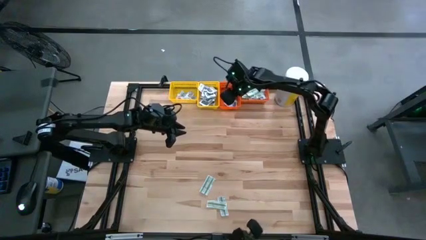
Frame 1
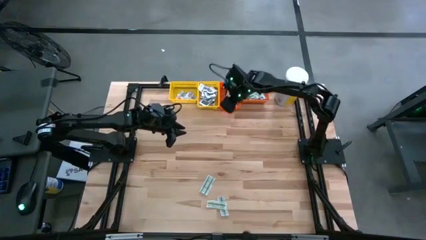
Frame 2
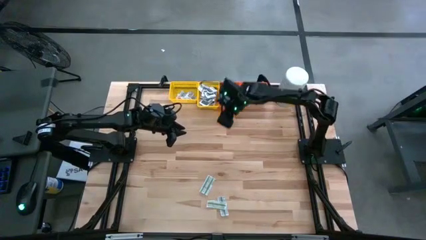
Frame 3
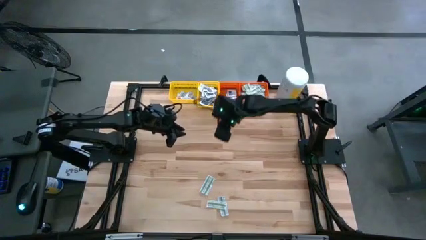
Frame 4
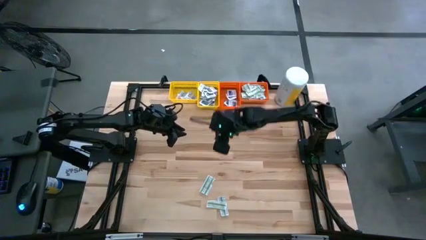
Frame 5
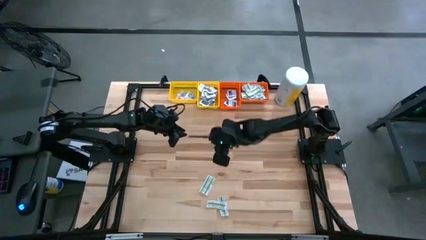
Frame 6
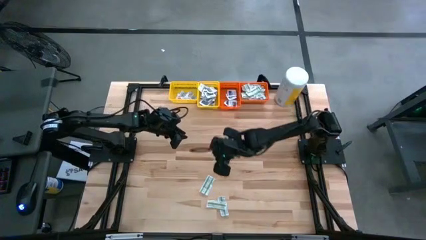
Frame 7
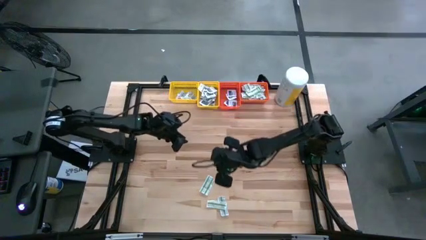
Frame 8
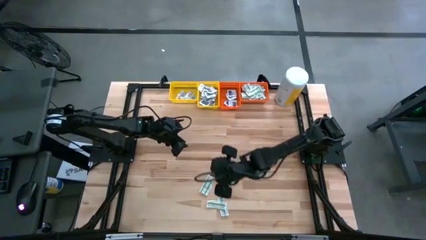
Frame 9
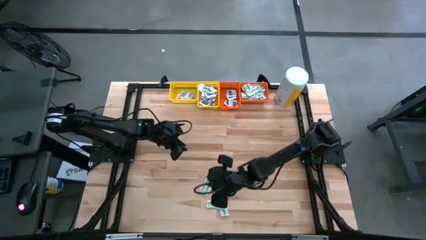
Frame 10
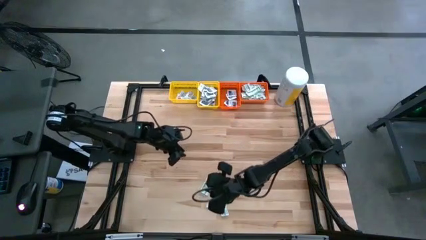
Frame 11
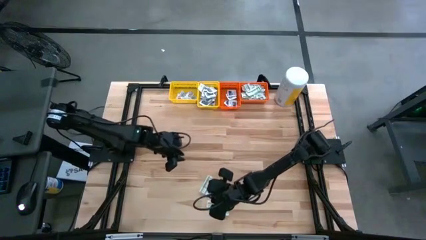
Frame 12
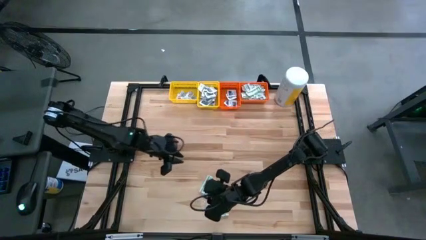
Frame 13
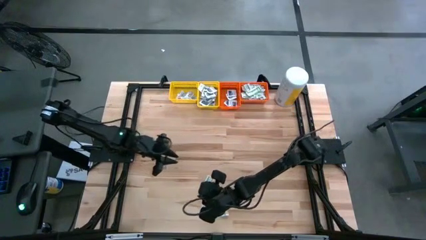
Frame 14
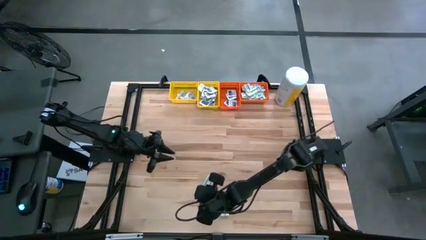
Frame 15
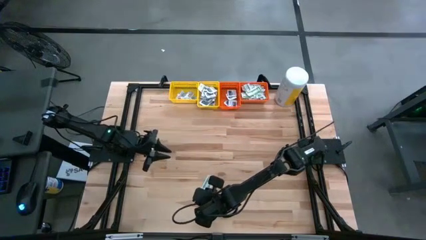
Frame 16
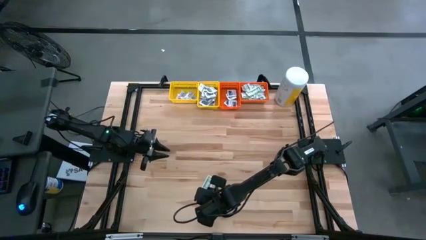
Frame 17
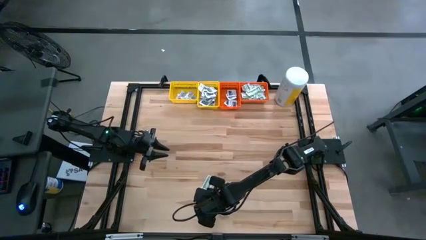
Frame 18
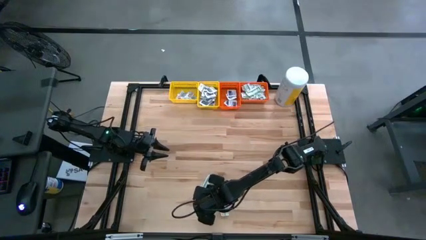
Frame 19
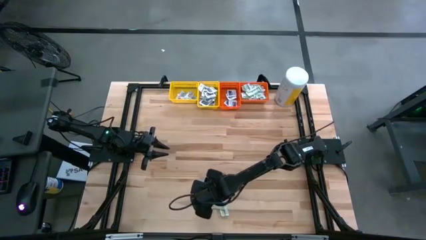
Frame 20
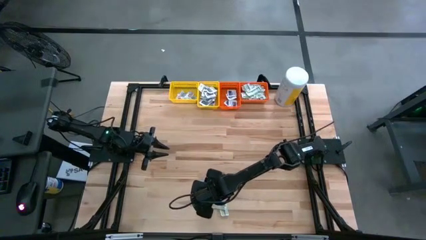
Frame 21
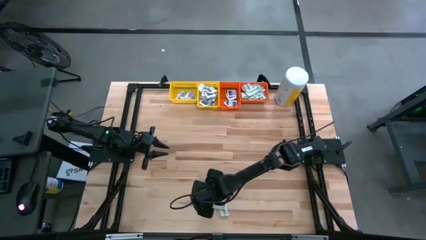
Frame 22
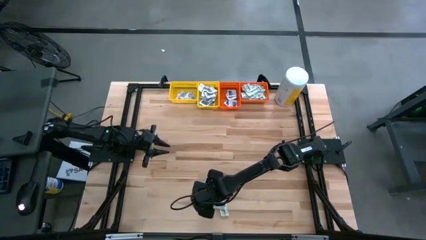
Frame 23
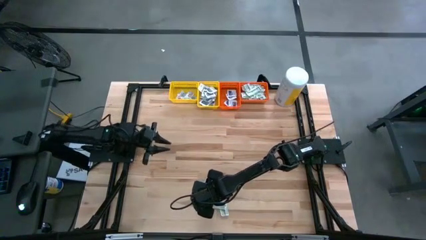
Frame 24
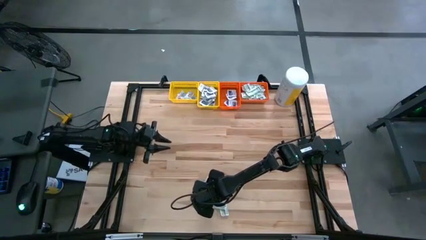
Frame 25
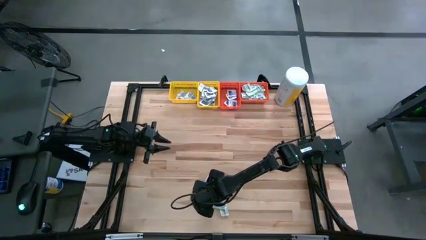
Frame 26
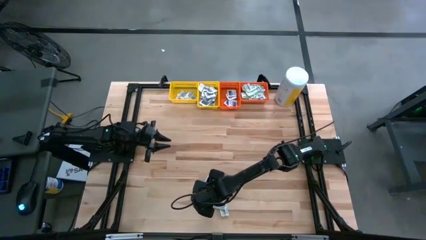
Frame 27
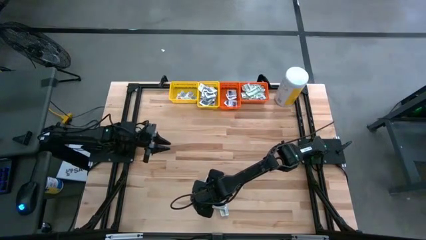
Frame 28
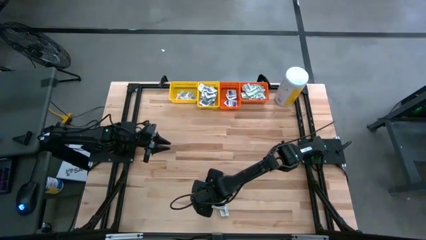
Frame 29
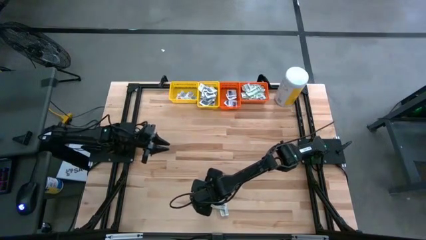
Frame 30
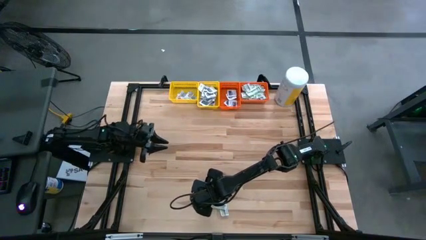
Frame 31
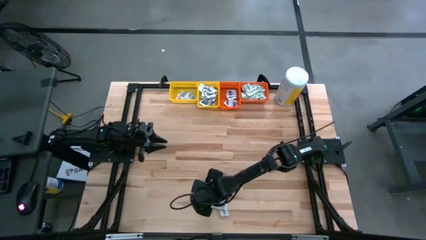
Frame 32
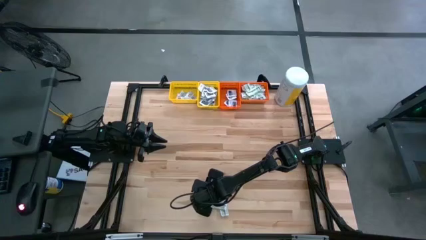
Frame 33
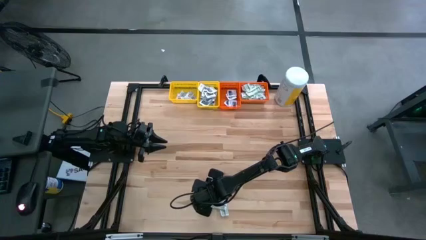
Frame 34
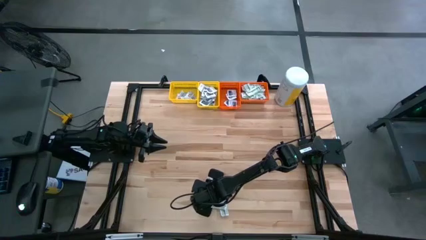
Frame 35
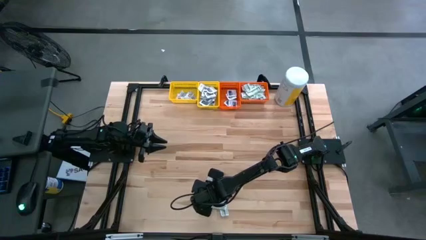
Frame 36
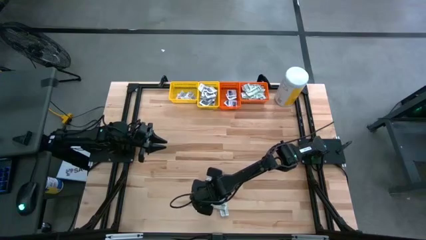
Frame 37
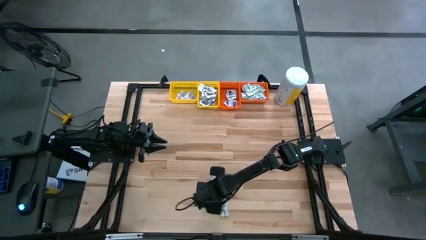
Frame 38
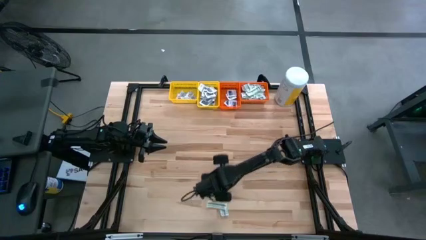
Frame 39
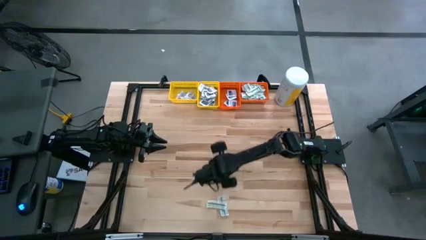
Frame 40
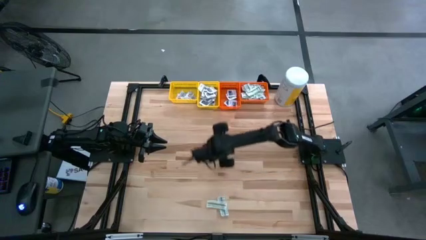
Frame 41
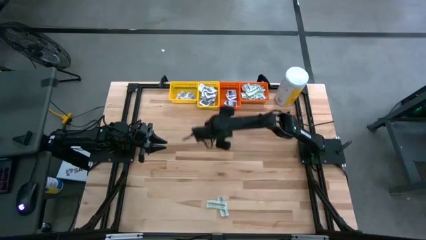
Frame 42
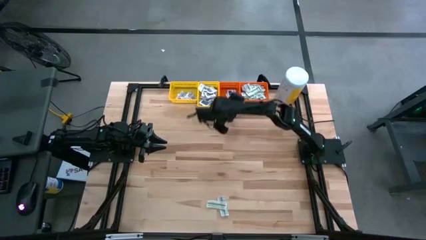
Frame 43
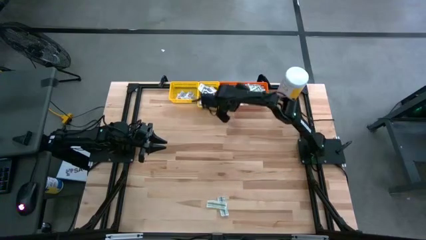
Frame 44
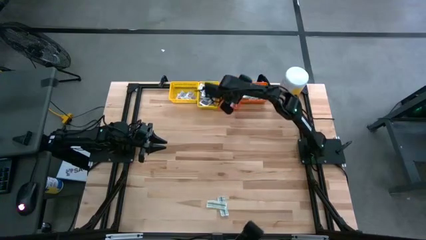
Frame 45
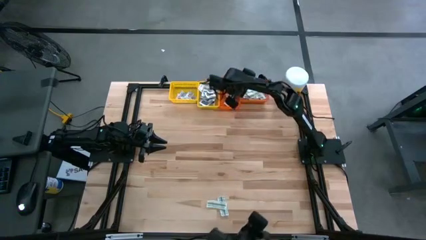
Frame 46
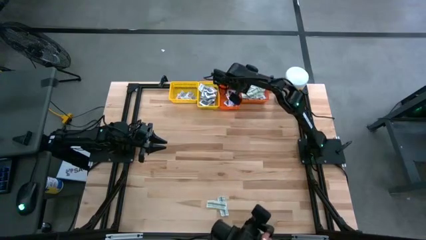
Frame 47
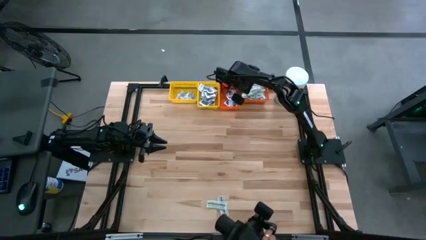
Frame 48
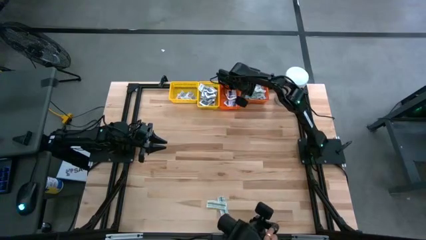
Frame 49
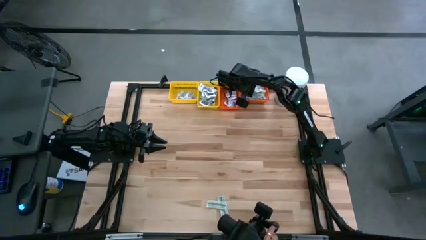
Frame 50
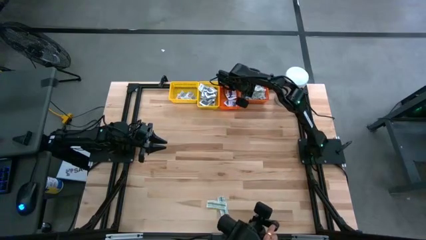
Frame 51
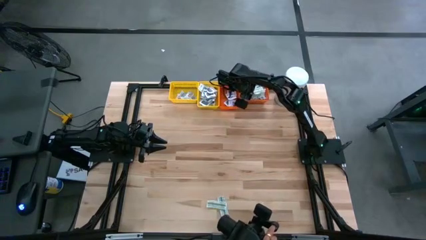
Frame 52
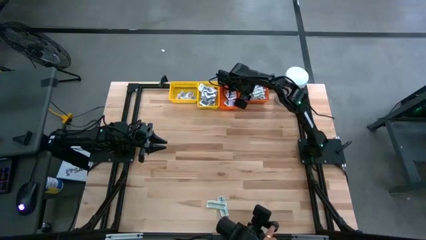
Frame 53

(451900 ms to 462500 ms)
Task: Pick & Place First Aid Supplies
Put the green pad into the right orange bin

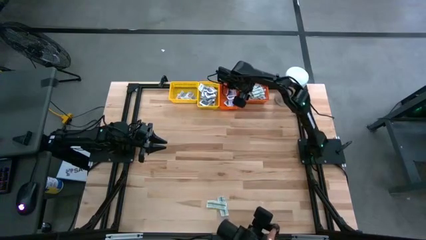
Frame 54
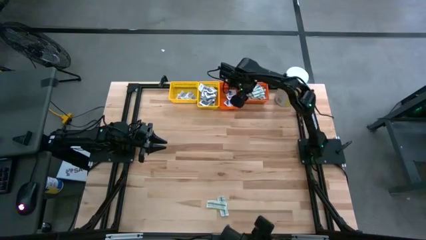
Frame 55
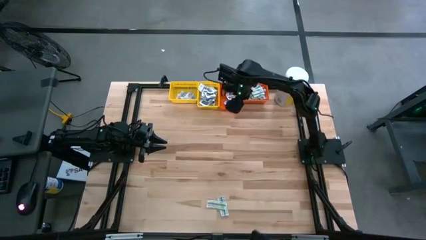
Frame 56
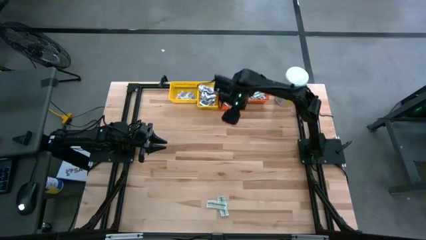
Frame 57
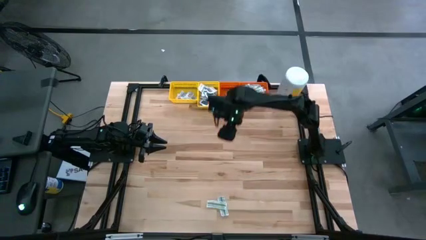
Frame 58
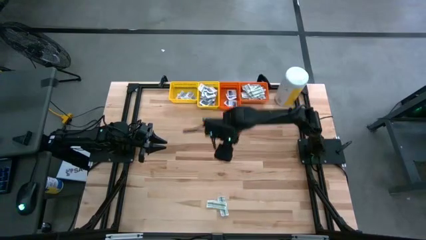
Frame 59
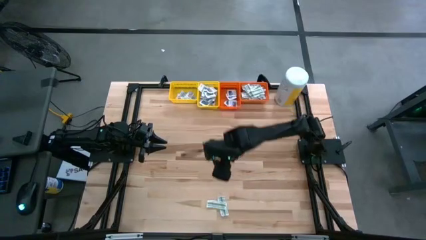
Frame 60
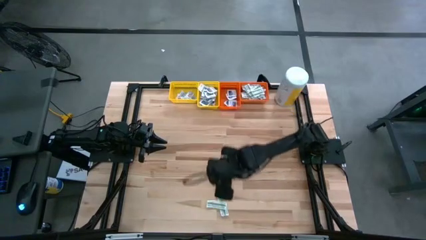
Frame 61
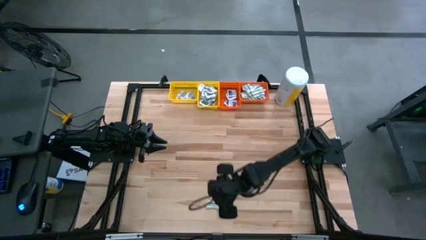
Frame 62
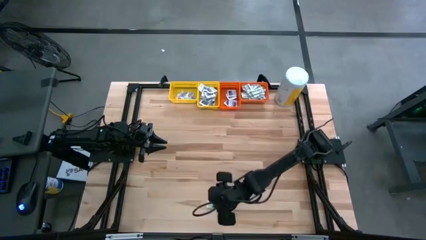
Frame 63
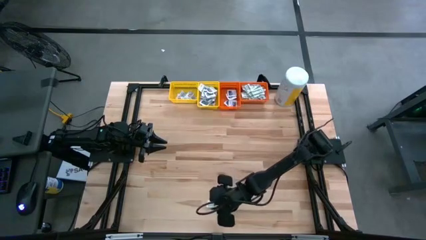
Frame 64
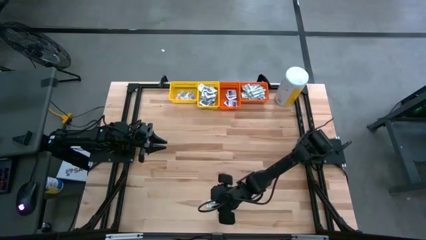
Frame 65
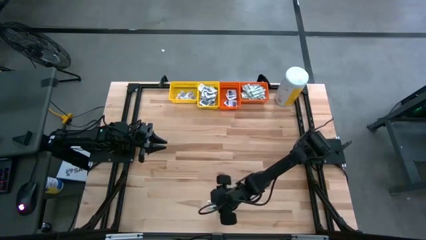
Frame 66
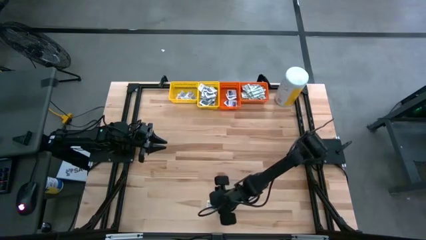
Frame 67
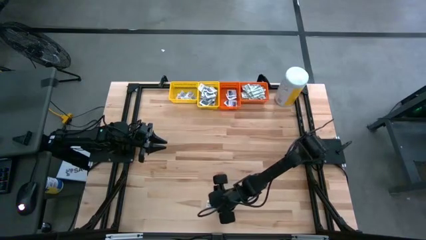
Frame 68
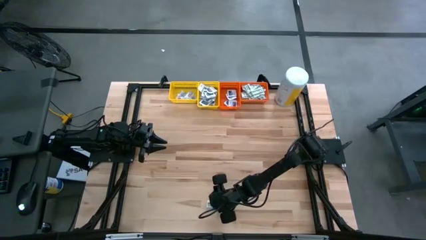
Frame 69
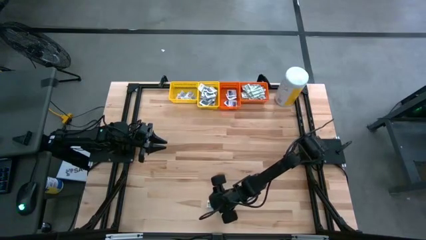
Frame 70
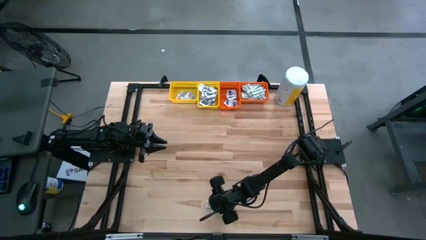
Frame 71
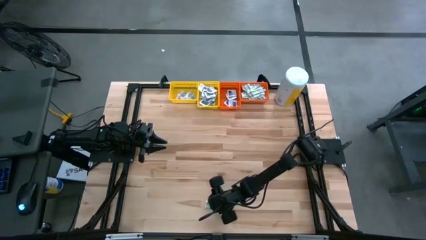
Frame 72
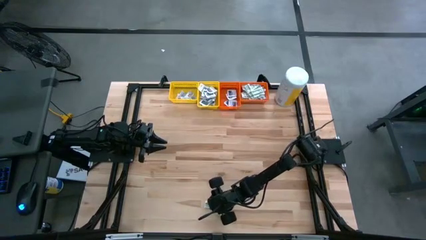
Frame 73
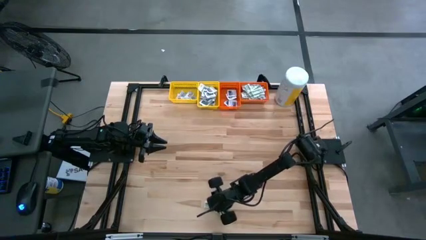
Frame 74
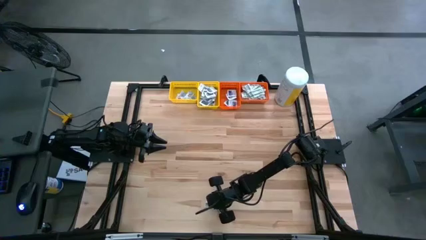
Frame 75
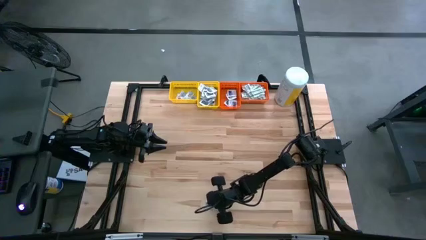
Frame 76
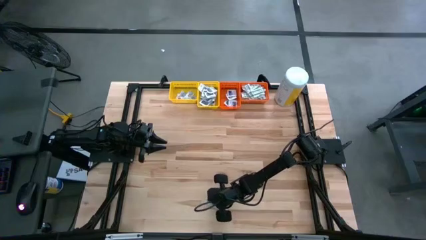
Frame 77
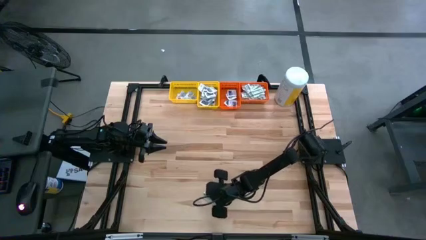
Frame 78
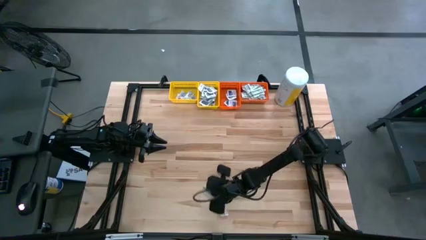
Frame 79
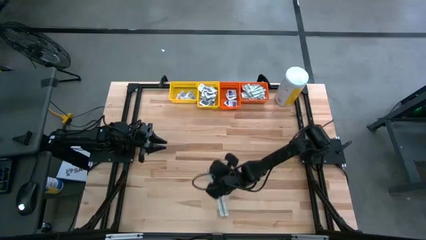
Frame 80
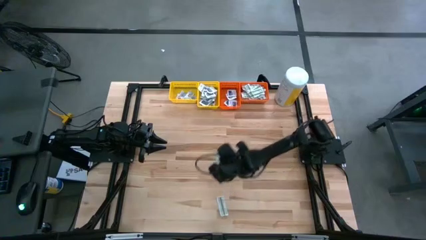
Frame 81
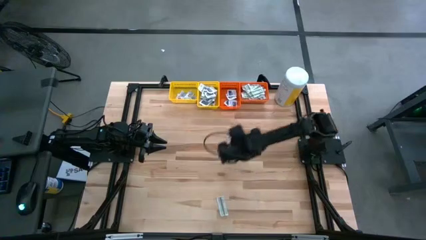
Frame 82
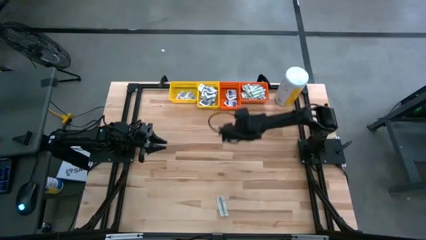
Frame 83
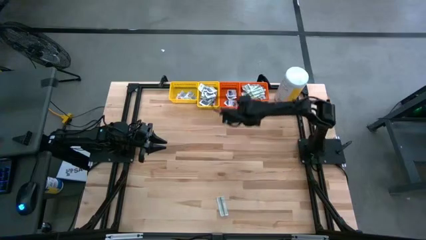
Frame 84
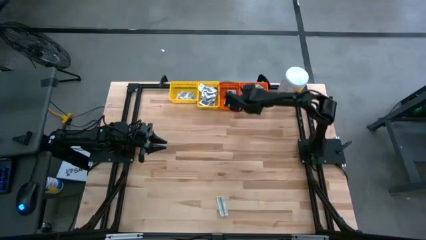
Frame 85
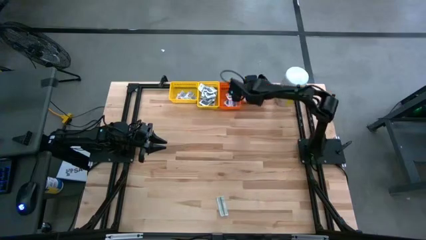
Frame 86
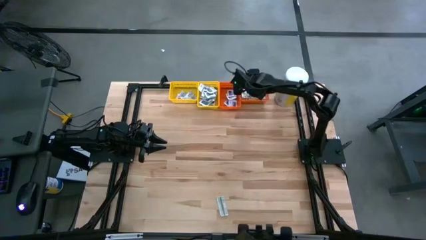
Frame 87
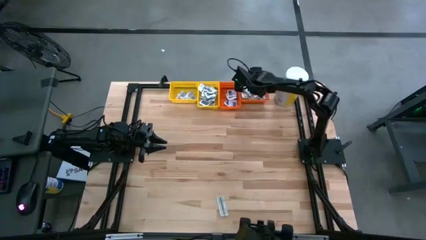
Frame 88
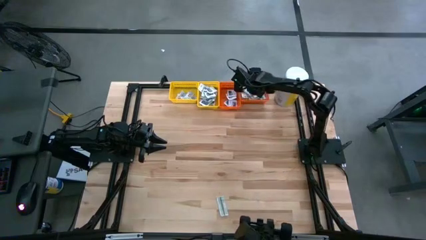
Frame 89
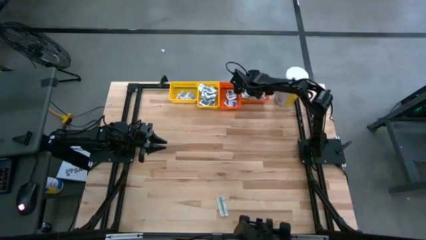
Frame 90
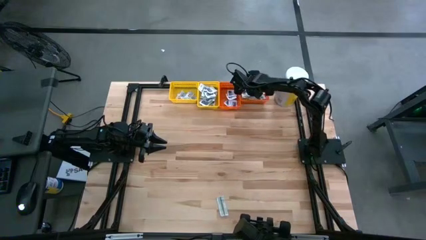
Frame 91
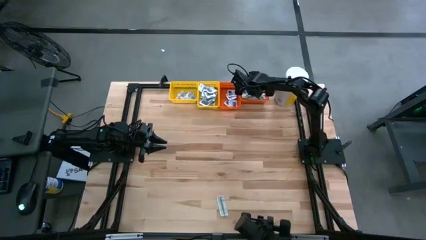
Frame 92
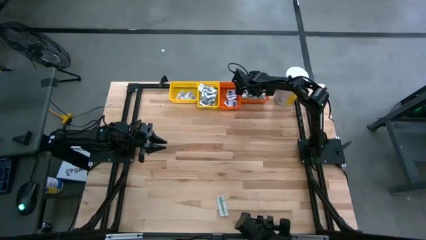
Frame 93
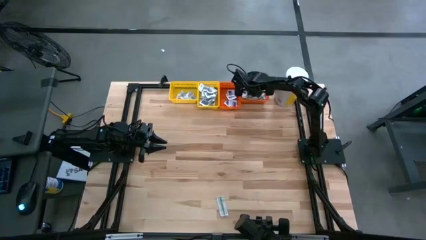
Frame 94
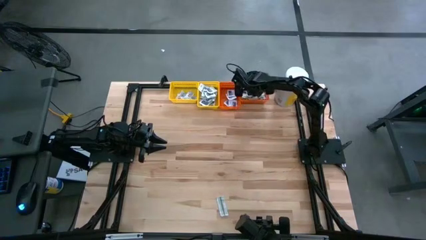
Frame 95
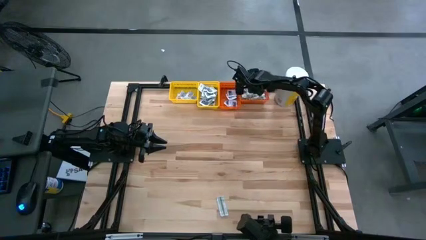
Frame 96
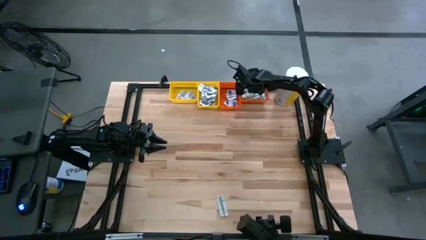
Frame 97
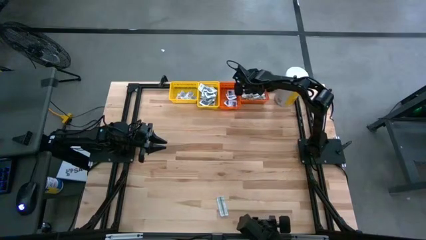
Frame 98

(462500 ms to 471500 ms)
Put the green pad into the right orange bin
